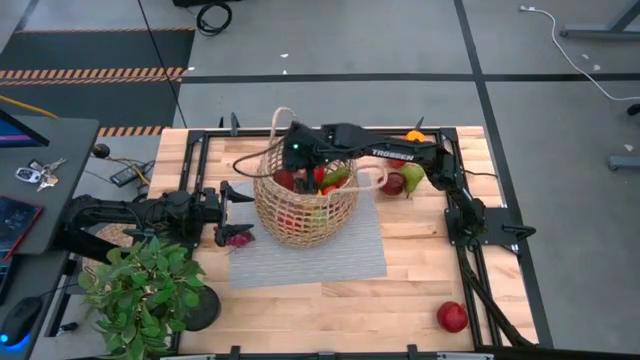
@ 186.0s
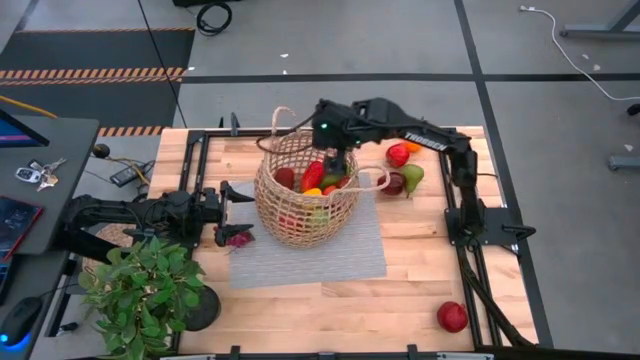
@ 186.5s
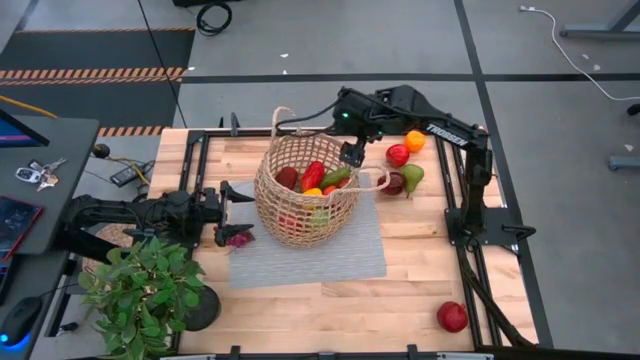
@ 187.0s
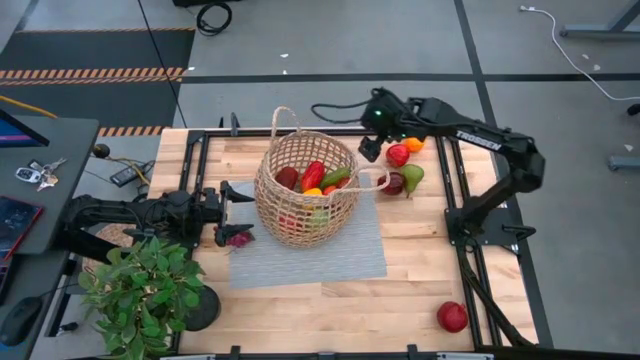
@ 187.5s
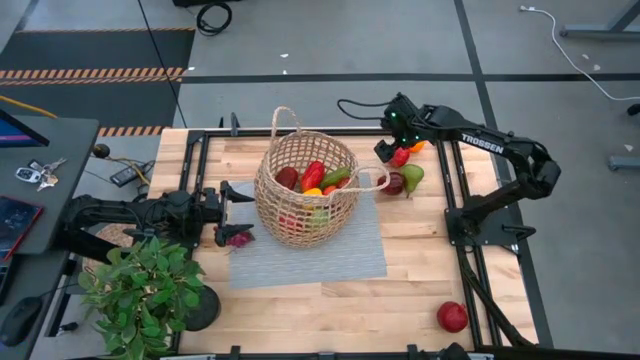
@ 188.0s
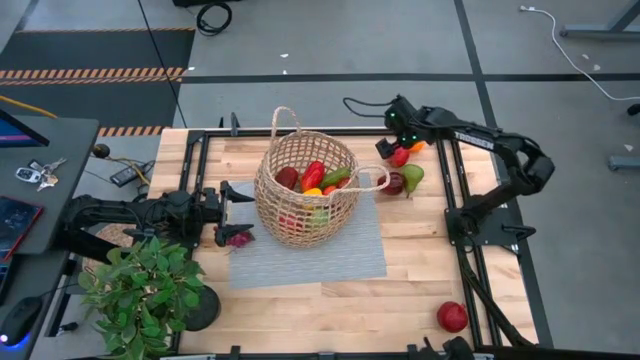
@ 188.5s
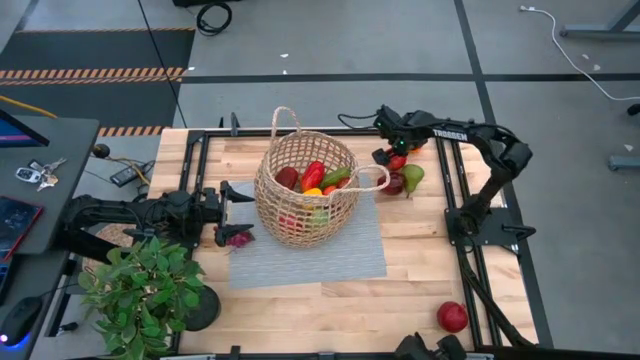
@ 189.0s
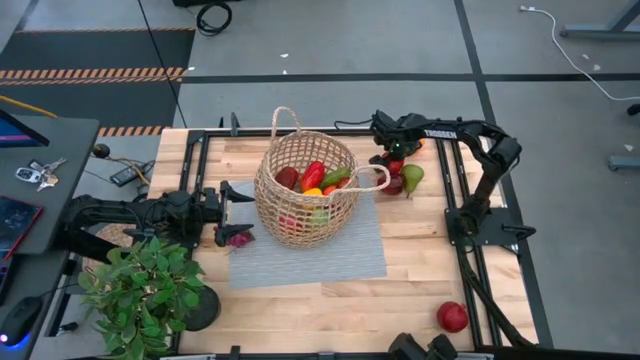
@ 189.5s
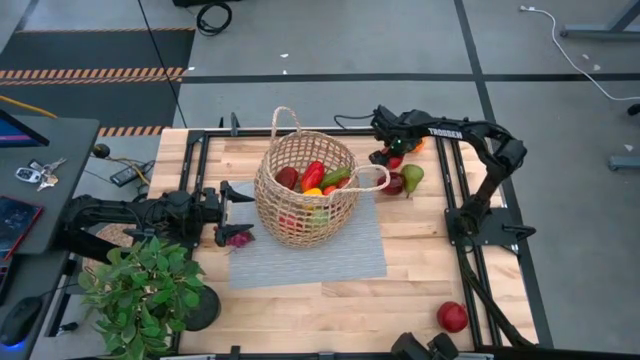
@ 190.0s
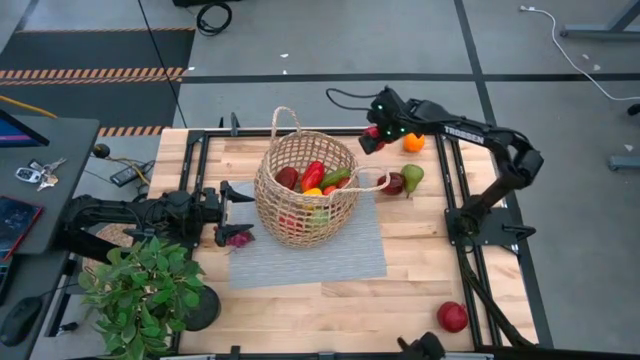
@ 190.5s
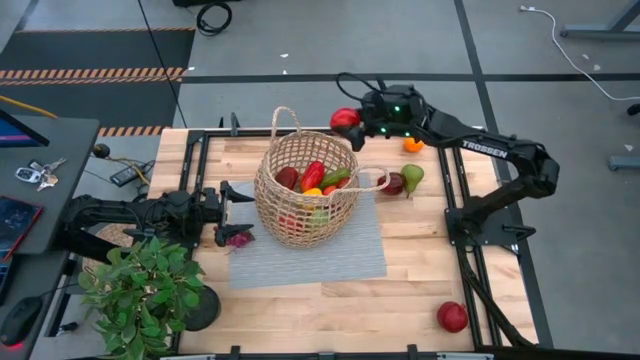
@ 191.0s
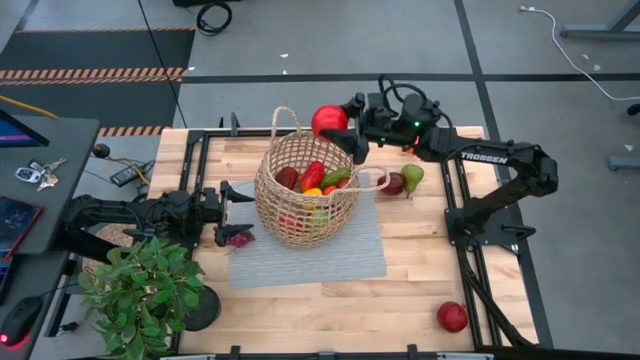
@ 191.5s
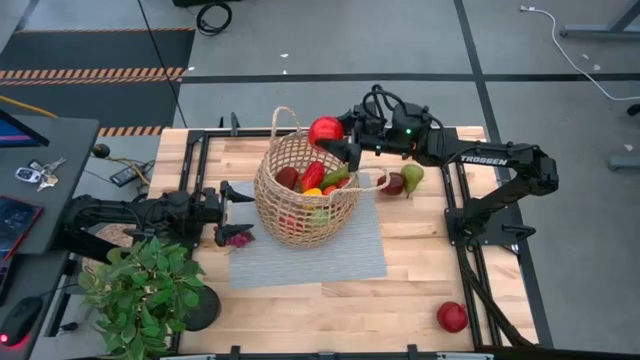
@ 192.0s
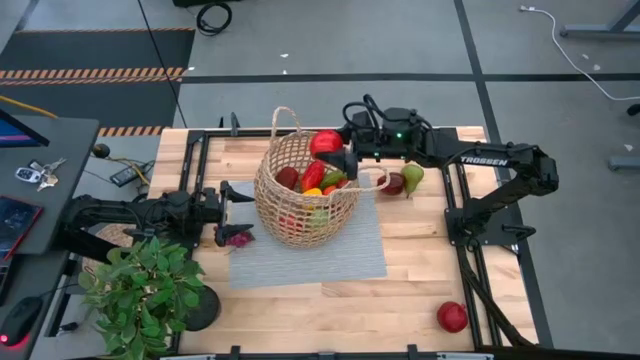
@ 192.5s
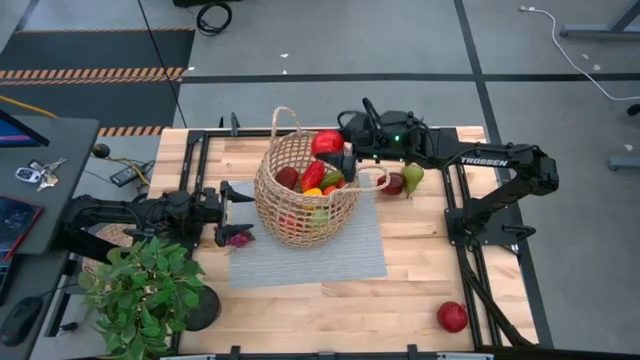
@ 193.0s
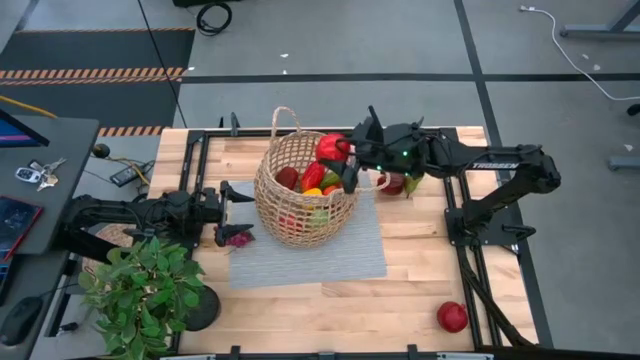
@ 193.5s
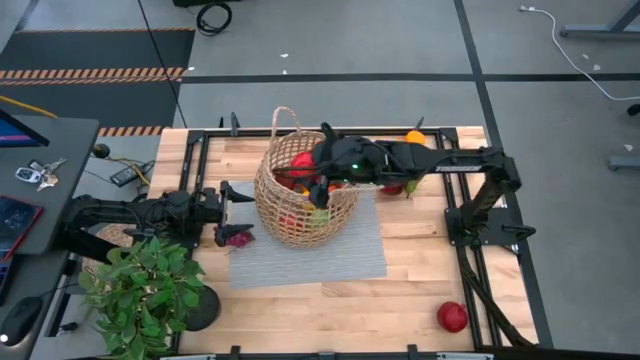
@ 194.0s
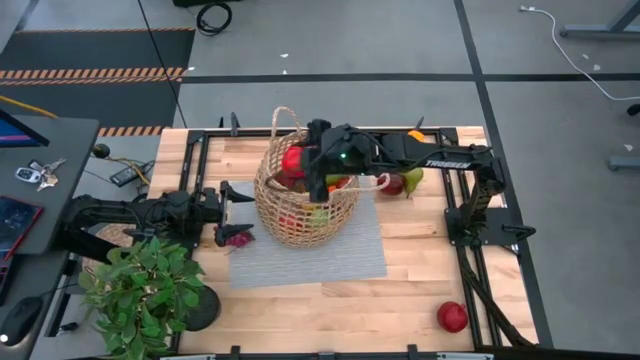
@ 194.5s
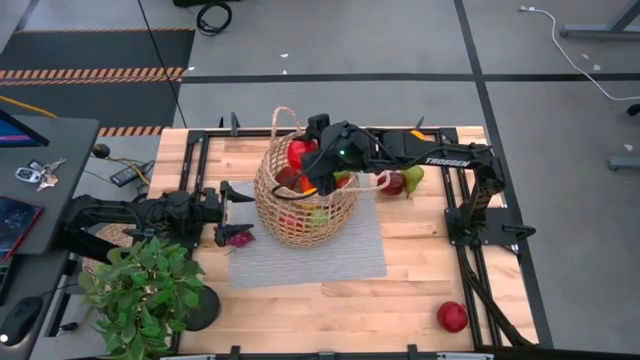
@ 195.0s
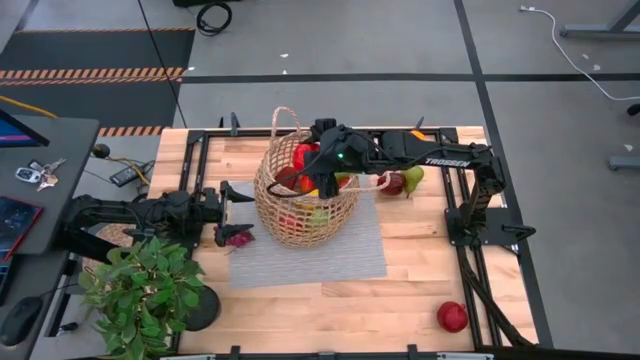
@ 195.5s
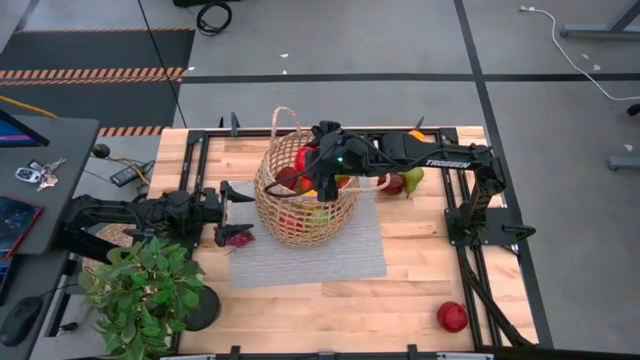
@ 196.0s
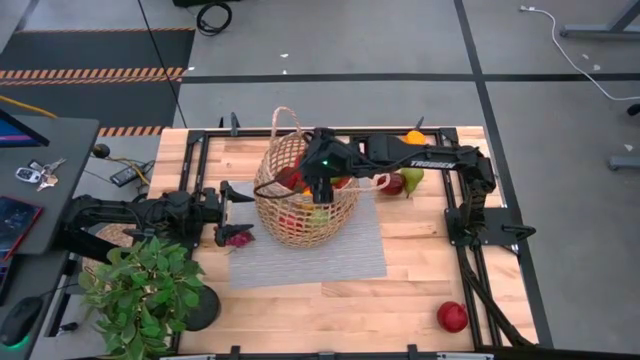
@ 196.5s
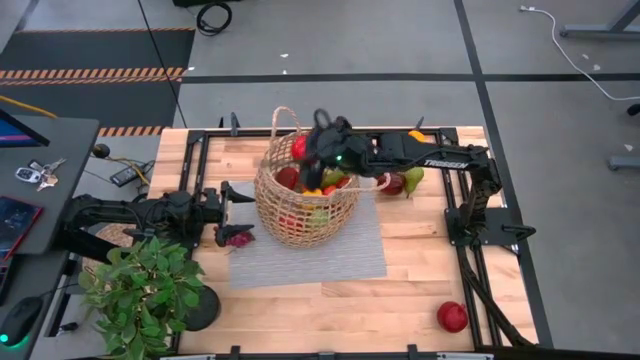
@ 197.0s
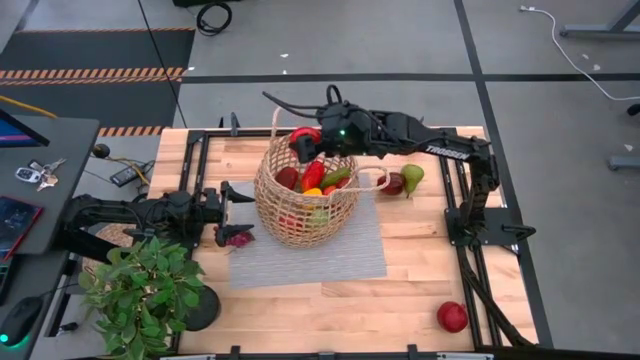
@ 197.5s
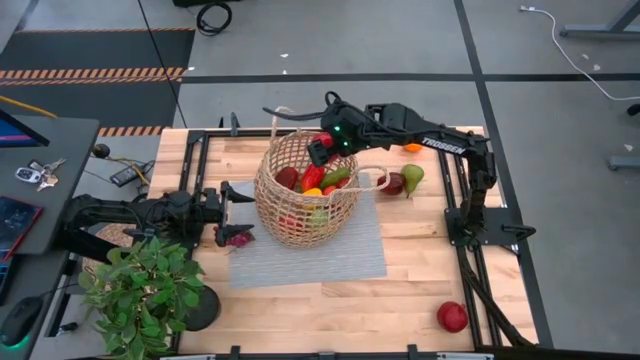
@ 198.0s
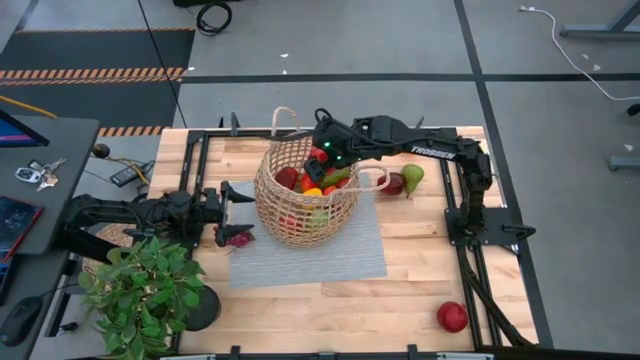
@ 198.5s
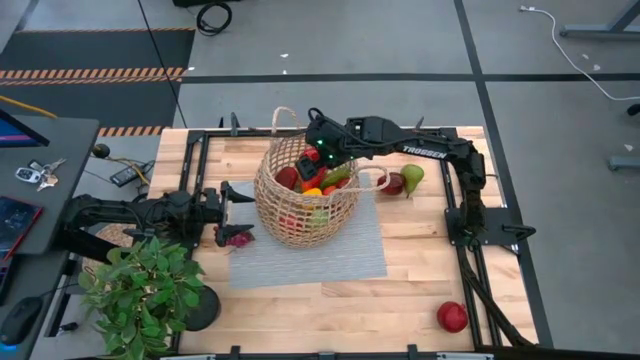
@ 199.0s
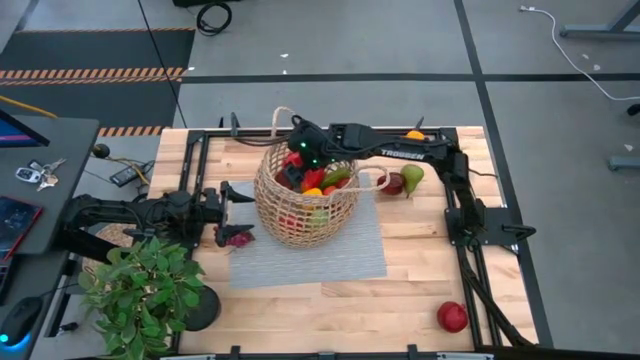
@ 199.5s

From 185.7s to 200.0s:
Task: Build produce basket
Put the red apple into the brown basket

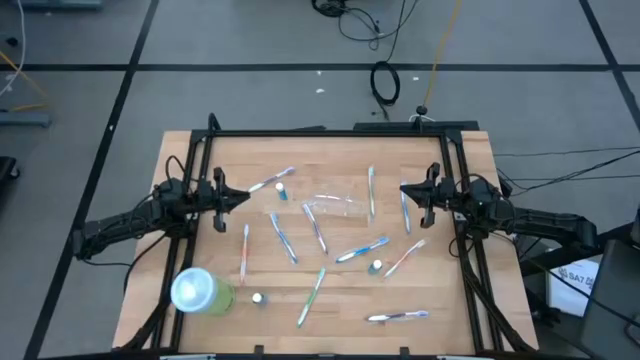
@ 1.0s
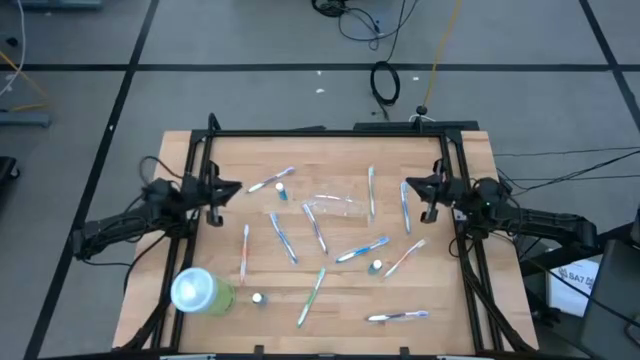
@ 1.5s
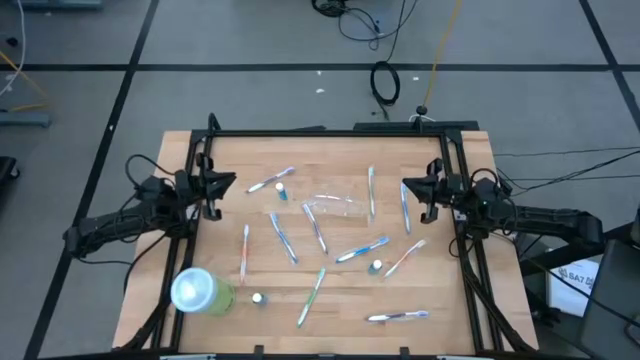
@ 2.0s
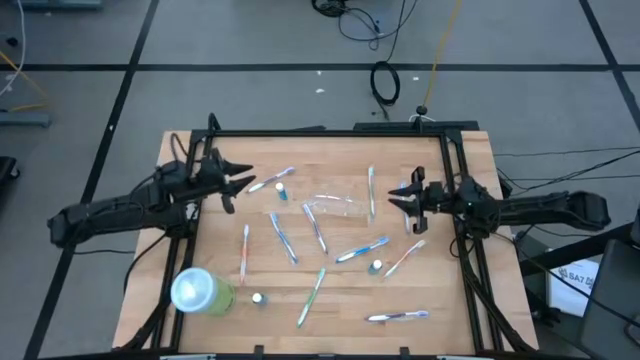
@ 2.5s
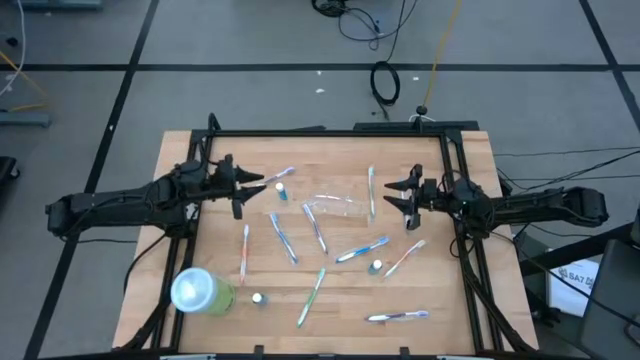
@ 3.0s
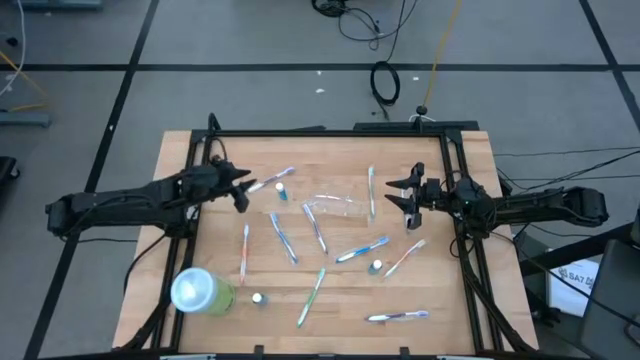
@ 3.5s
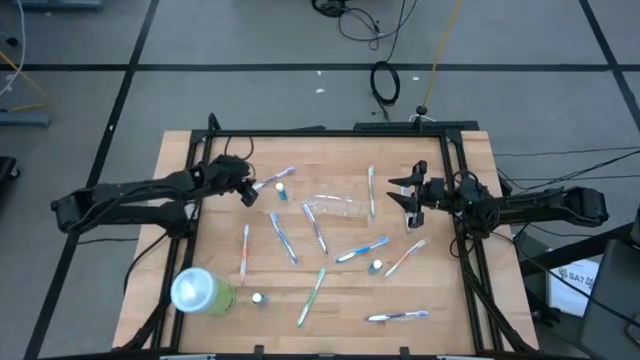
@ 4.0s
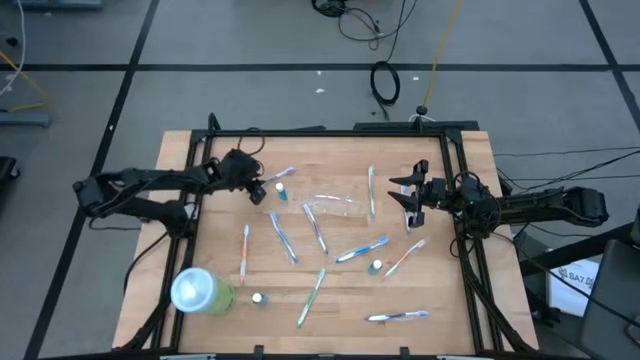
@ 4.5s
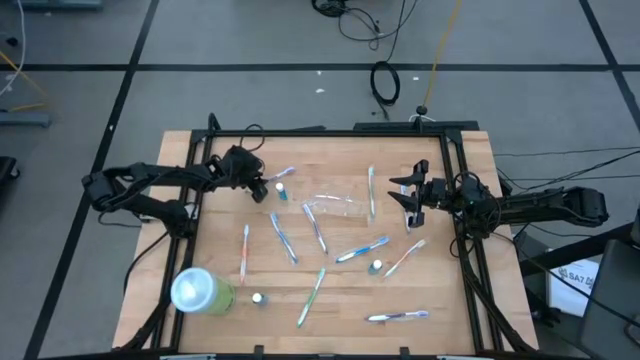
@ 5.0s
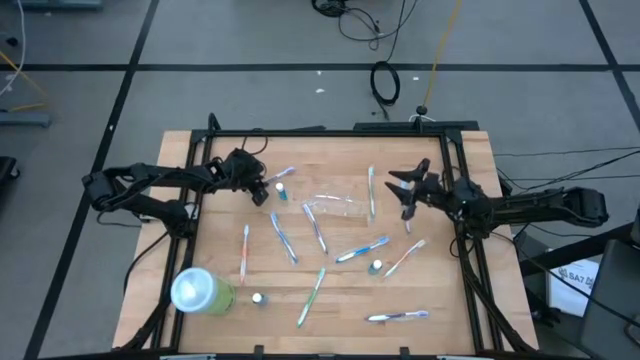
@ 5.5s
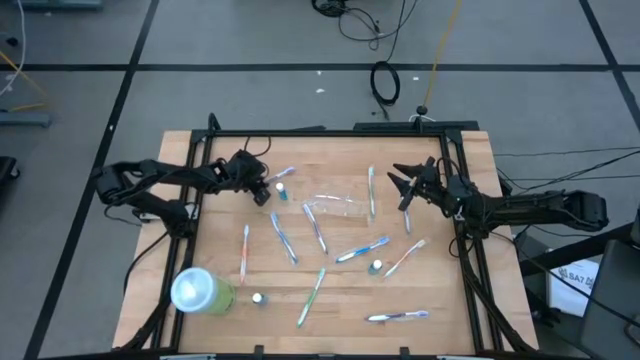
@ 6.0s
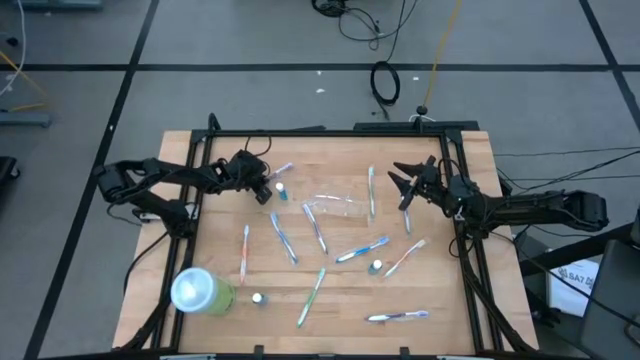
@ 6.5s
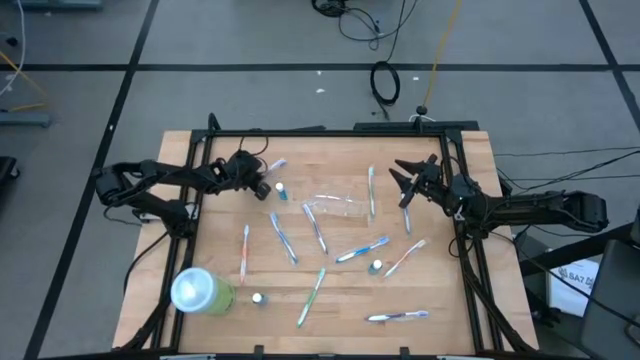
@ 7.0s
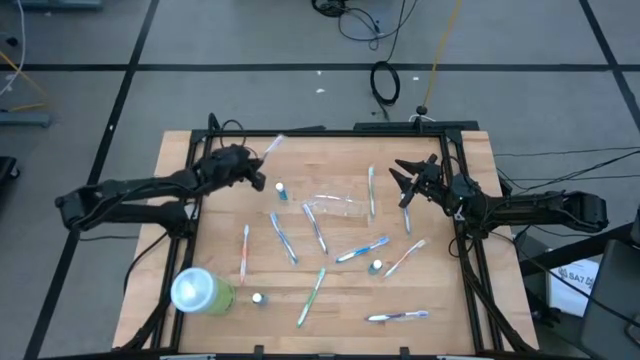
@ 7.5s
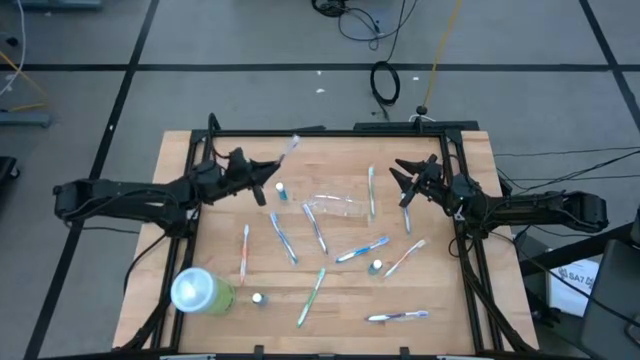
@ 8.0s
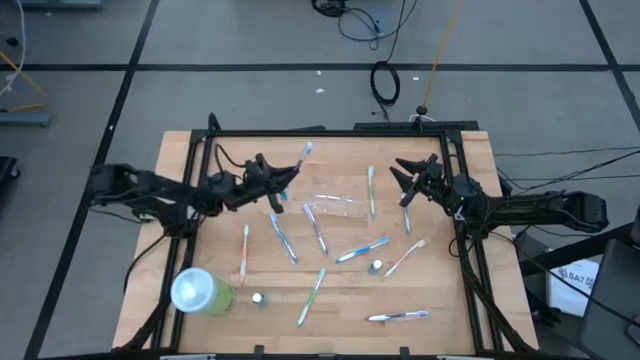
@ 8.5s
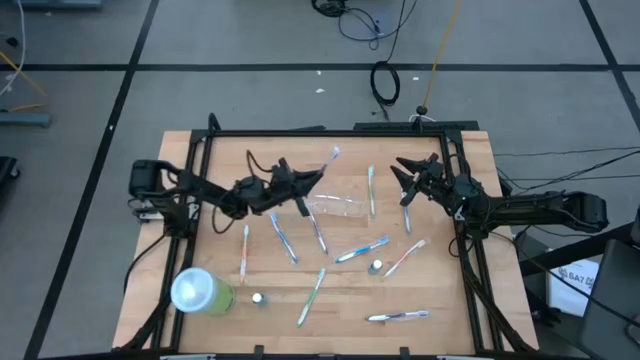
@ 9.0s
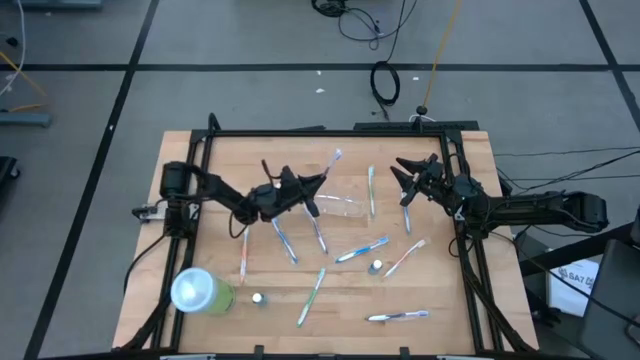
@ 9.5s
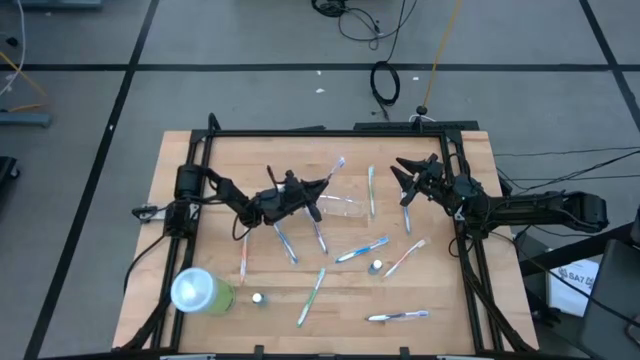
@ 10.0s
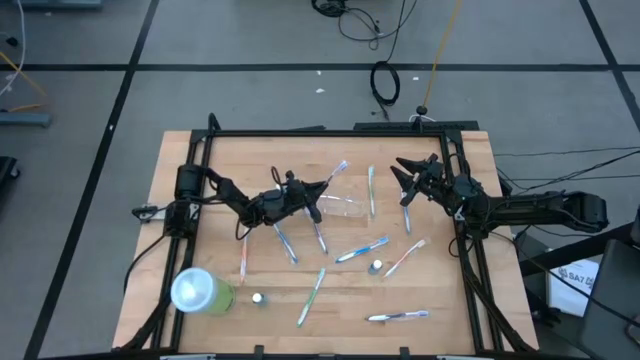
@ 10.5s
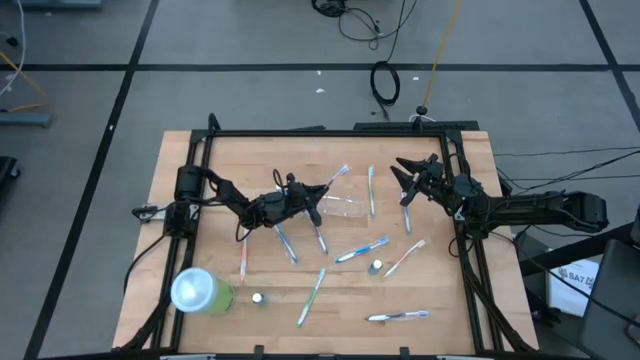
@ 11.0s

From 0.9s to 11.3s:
Task: Pick & Place toothbrushing station
Put the top left purple toothbrush into the transparent organizer
